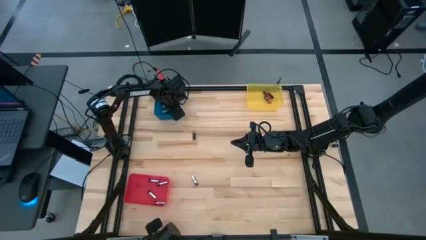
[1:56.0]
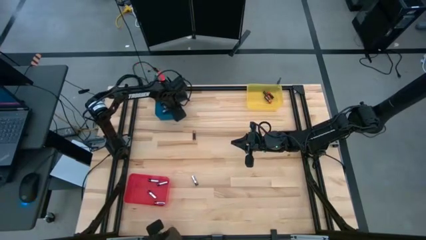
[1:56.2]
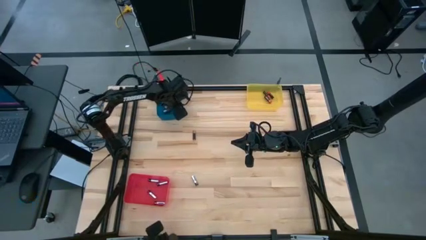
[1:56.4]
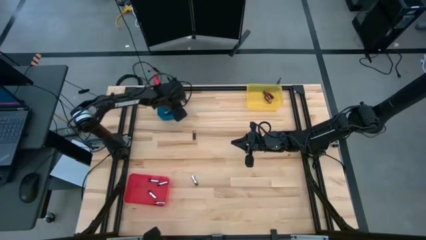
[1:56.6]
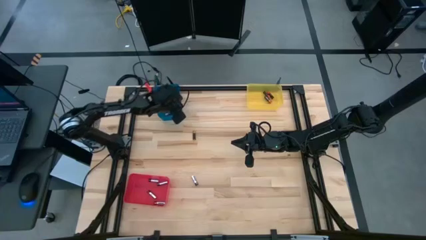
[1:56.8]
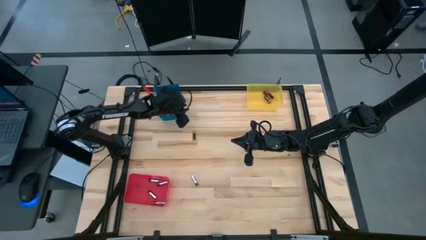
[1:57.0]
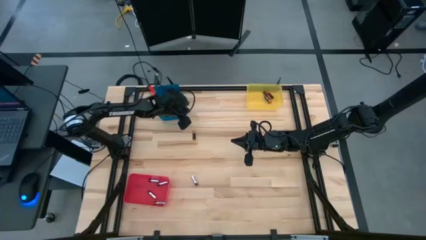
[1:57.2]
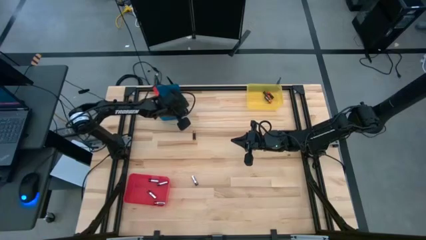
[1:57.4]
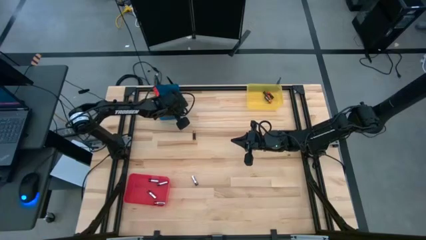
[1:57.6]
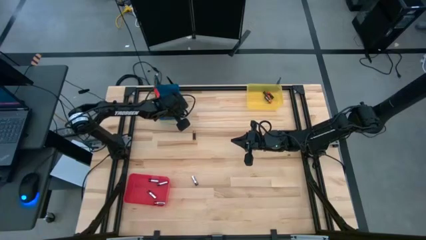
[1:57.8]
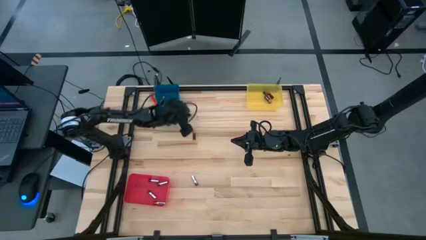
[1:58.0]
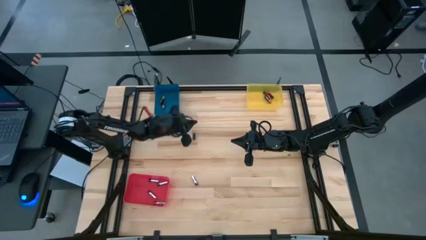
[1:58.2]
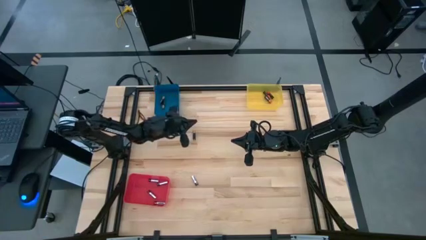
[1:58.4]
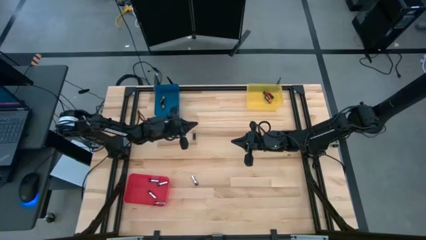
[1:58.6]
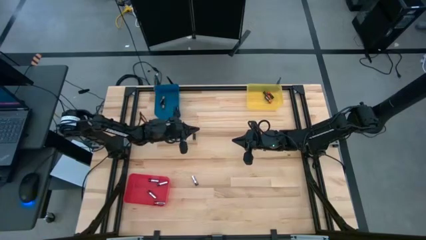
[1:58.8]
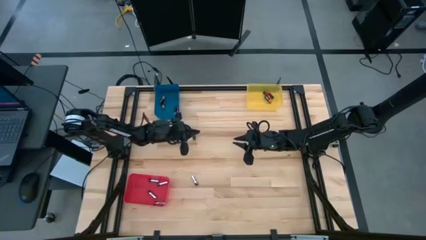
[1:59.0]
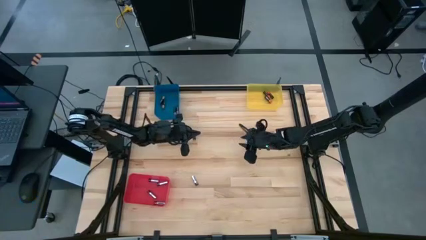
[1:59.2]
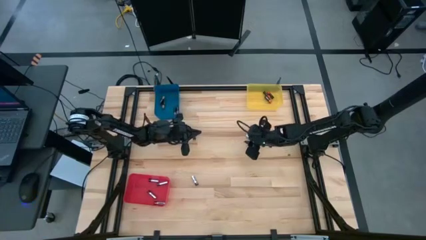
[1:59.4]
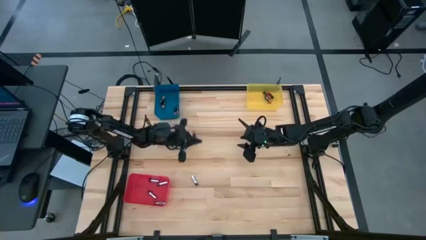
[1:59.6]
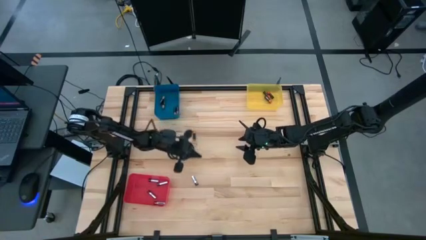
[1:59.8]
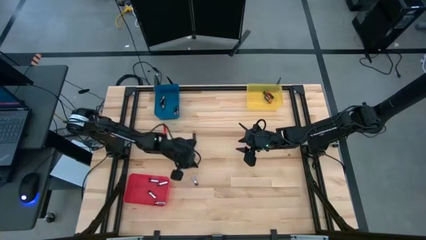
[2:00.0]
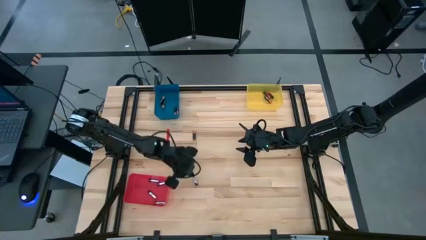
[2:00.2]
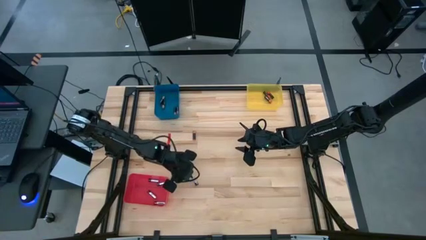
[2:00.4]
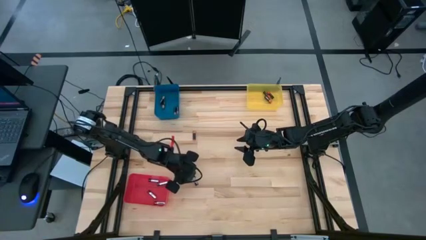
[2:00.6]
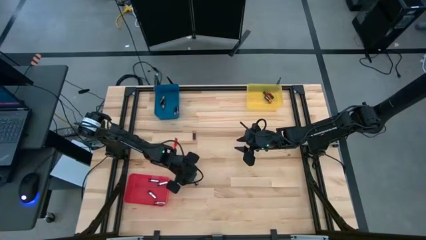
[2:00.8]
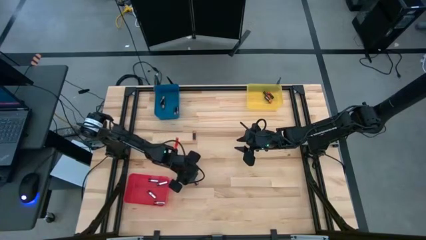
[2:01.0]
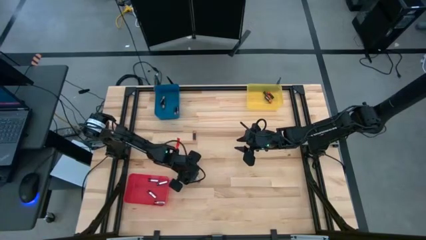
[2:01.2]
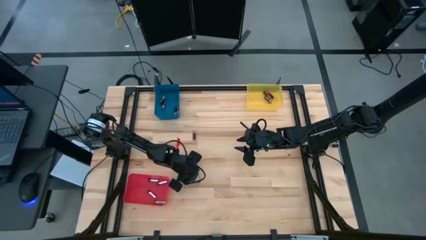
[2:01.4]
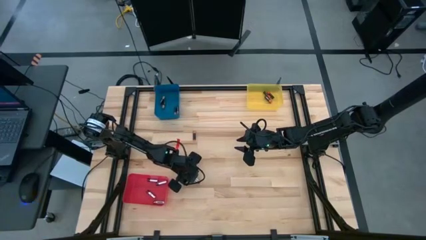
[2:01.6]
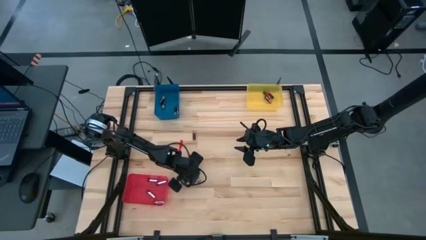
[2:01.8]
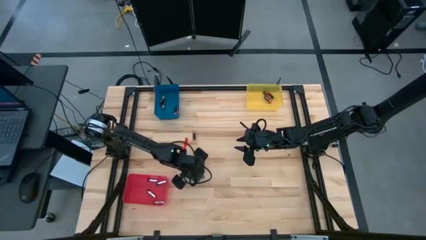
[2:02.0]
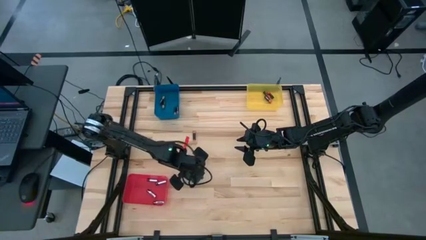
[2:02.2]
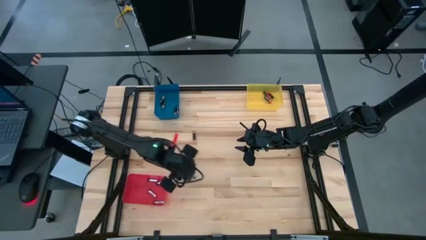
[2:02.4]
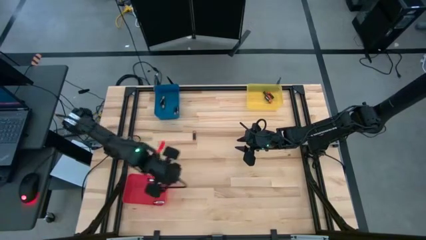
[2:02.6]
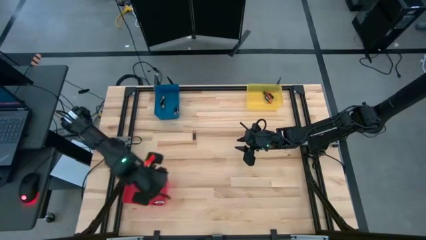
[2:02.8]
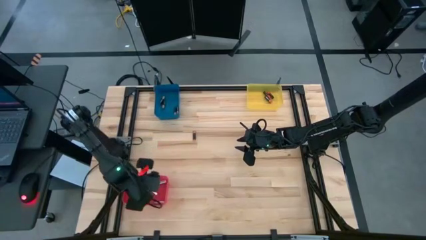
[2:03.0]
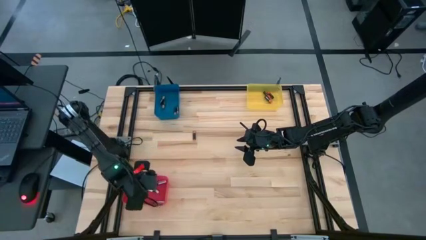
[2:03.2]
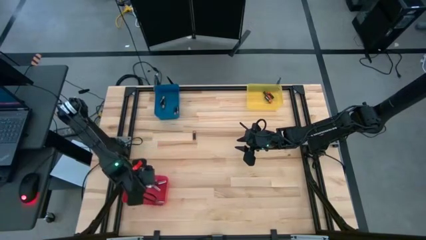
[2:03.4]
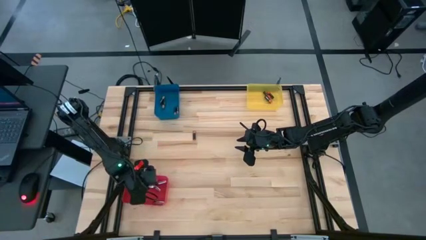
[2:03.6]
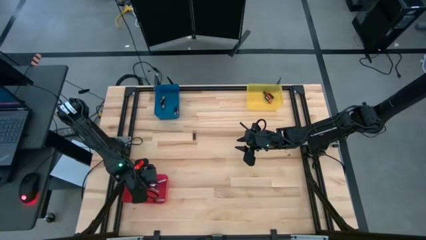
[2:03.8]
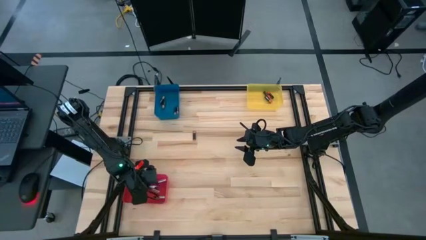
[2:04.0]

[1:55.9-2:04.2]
Task: Sort batteries
Put the silver battery into the red bin

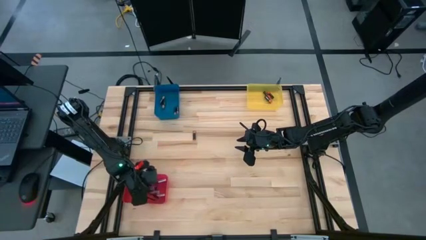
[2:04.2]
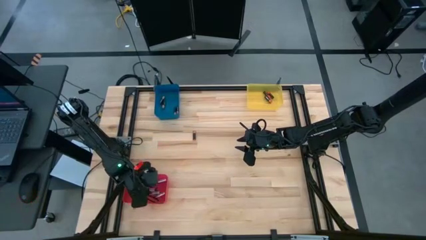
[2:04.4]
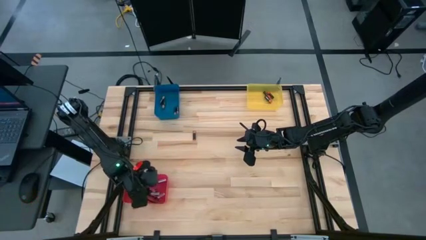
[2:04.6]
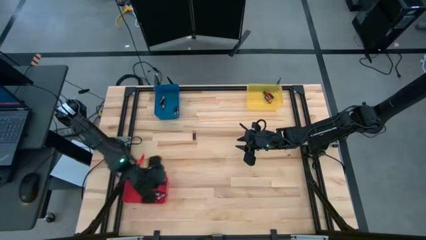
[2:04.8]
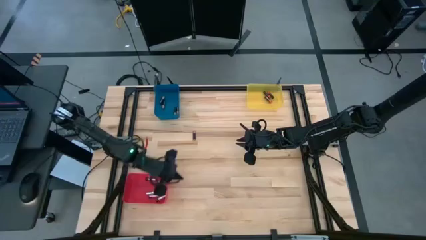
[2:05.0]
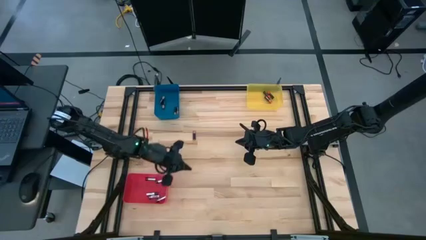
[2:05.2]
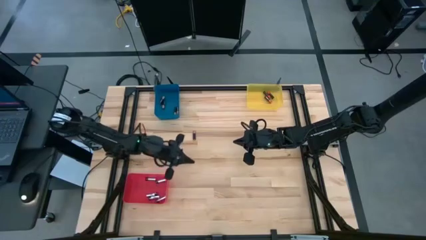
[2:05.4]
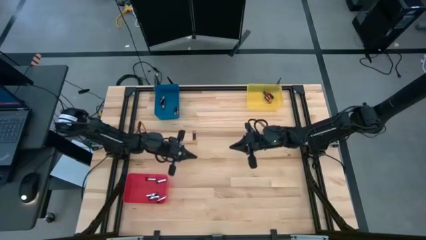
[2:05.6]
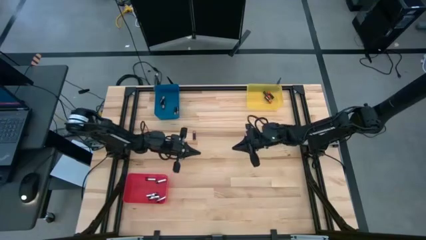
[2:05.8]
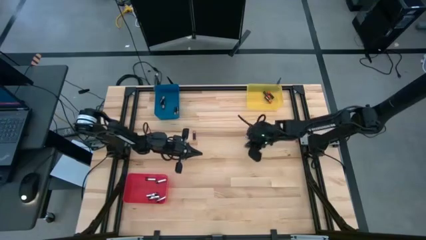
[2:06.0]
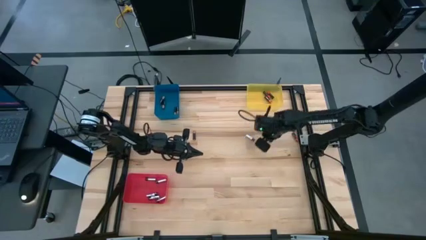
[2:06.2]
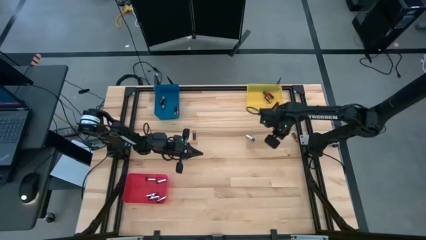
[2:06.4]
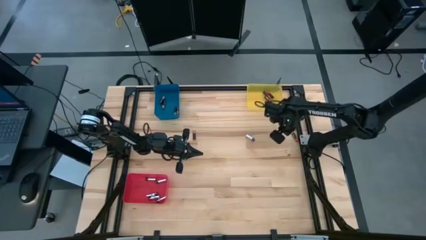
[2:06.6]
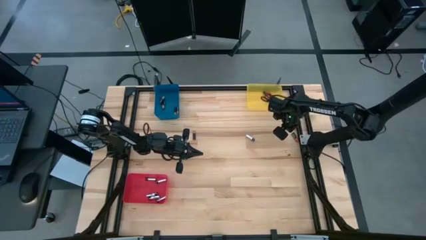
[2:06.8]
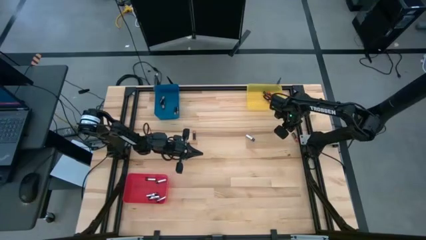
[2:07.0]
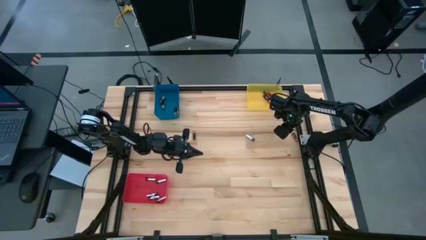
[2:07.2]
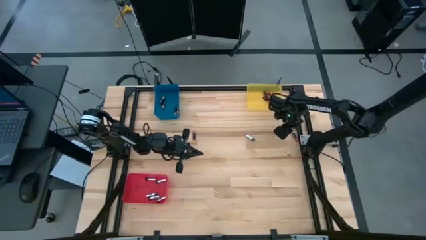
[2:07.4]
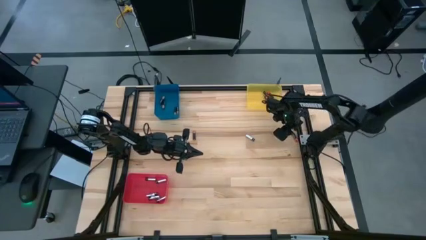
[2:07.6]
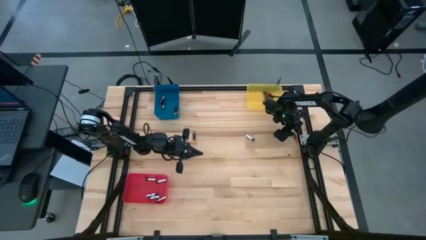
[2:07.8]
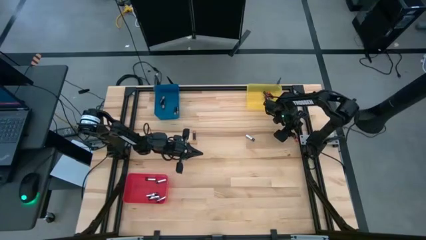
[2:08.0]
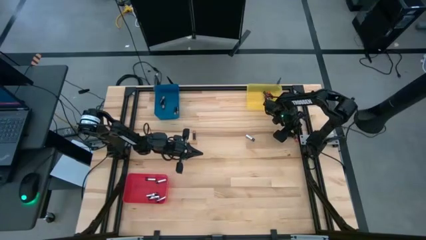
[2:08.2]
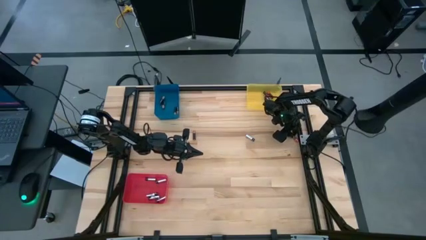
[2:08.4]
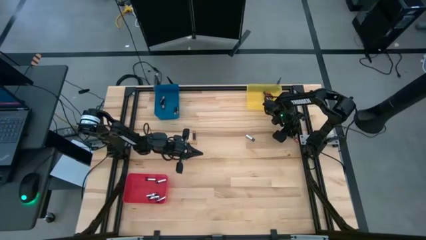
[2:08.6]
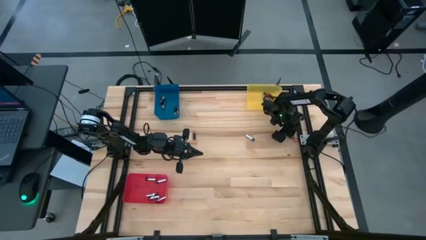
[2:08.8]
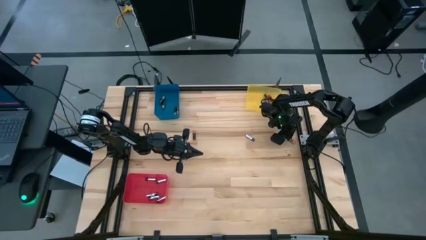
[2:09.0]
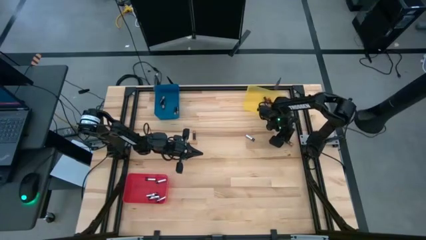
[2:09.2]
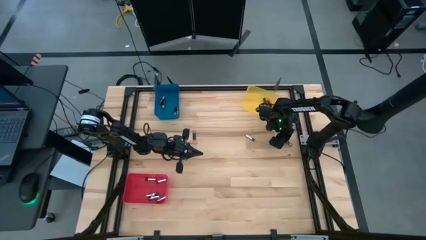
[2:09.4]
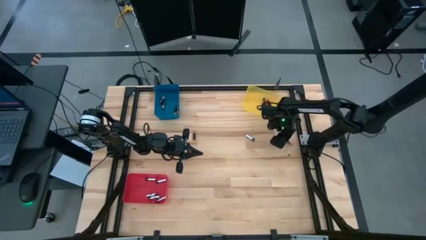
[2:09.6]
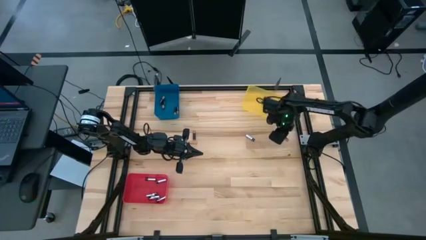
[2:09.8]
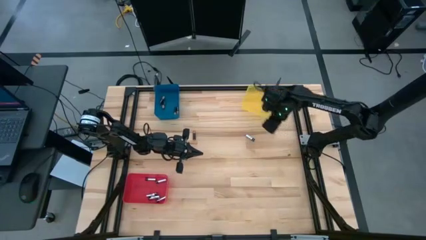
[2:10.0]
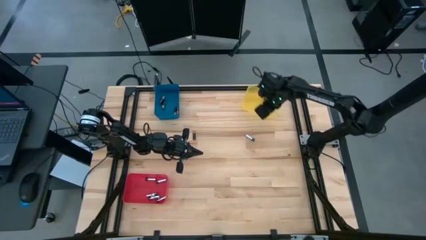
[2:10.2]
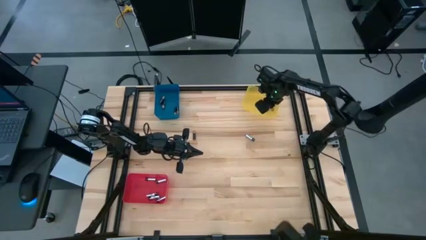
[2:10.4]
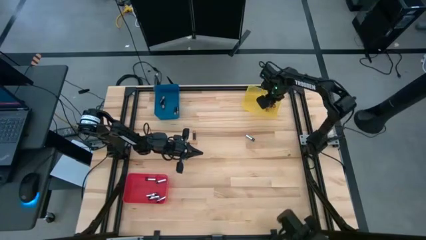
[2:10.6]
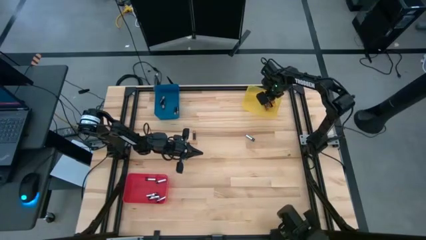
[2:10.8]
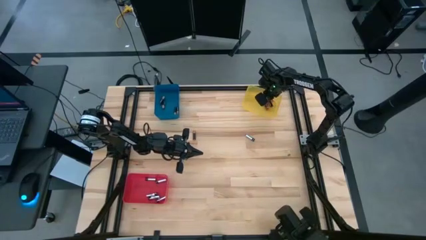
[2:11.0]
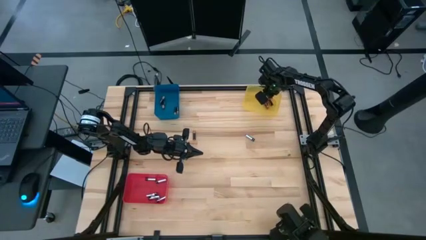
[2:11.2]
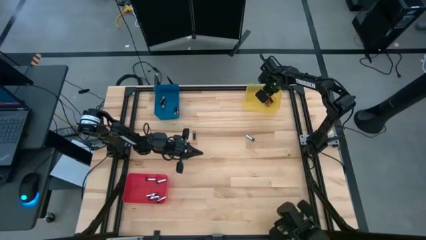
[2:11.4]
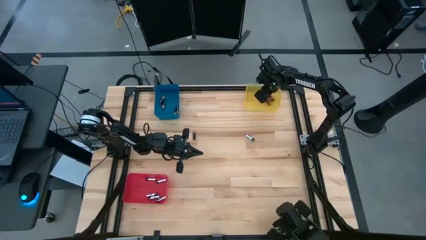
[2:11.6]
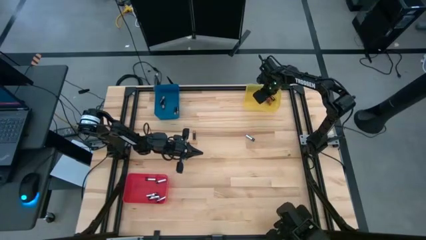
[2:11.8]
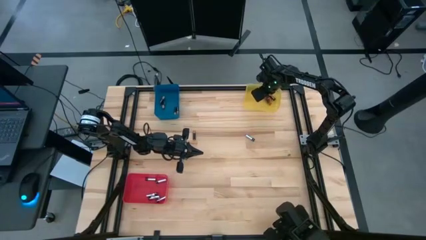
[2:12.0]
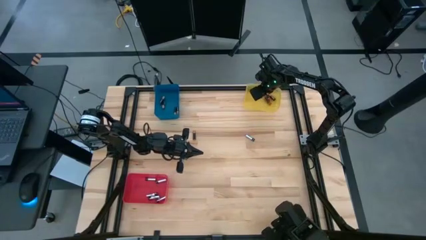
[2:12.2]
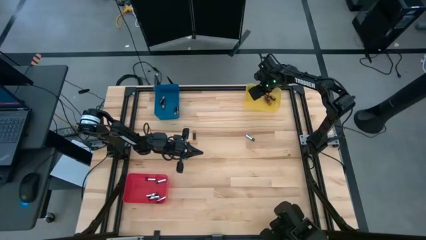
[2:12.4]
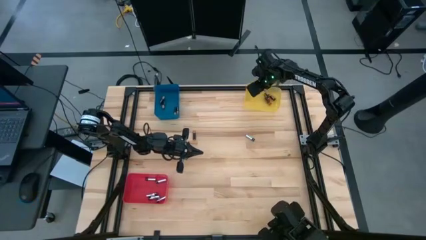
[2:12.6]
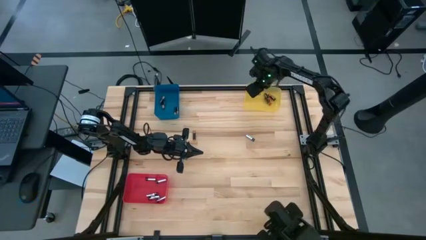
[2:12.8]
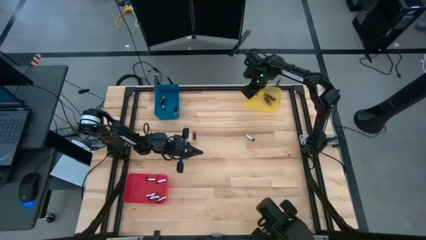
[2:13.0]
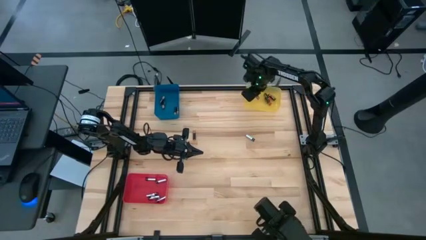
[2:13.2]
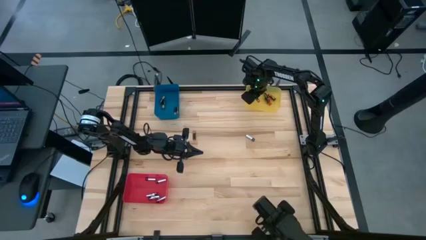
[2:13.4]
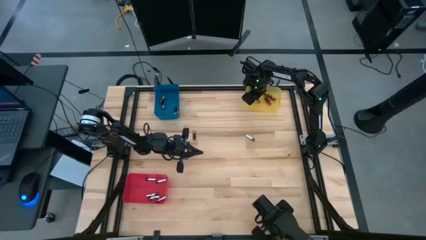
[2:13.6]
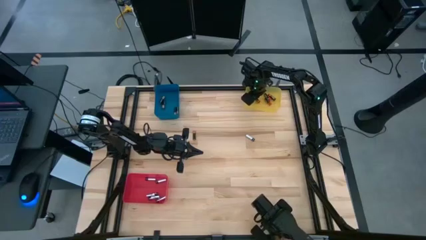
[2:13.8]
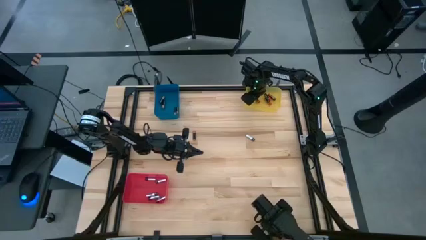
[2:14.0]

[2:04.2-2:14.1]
Put the red battery into the yellow bin
